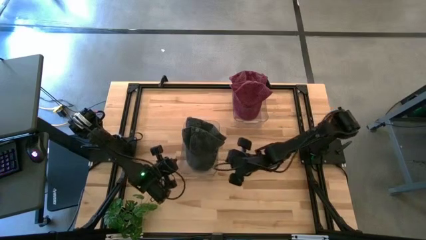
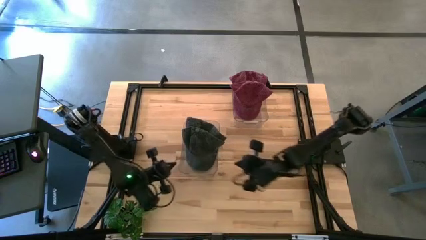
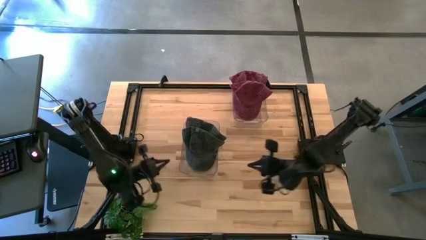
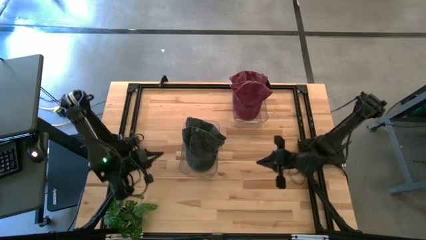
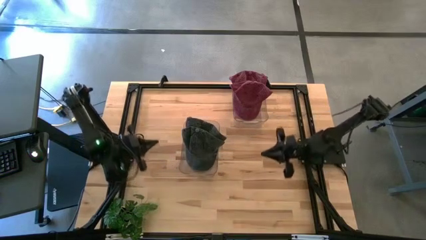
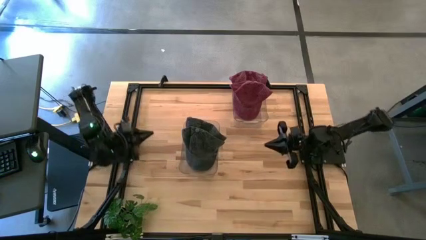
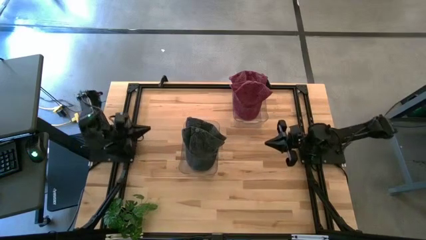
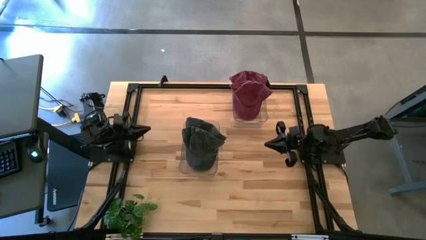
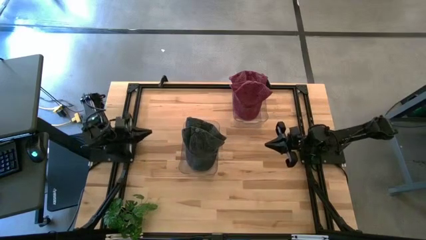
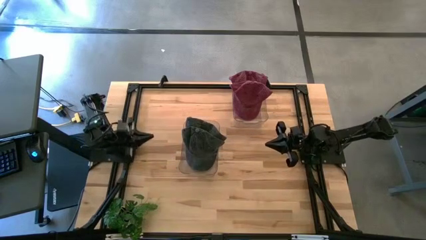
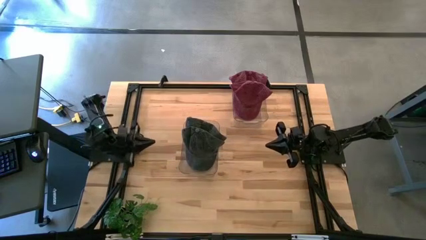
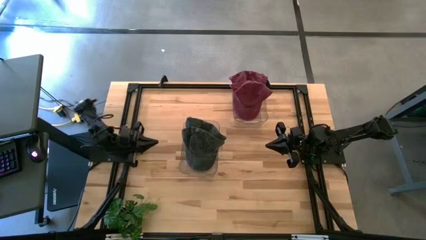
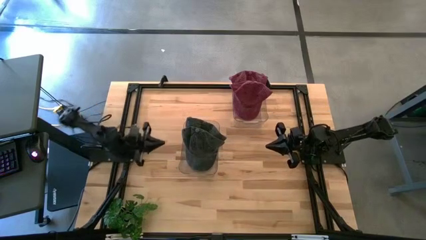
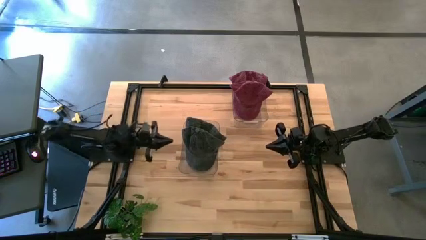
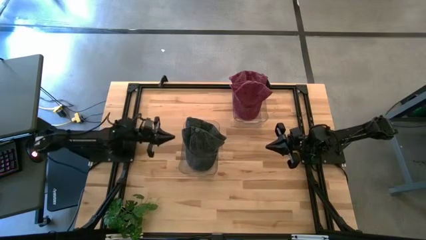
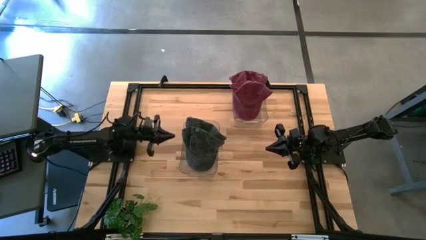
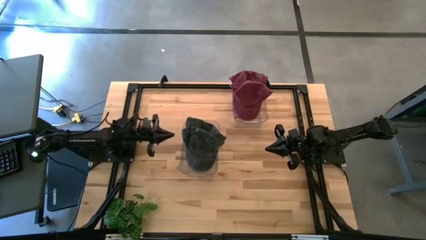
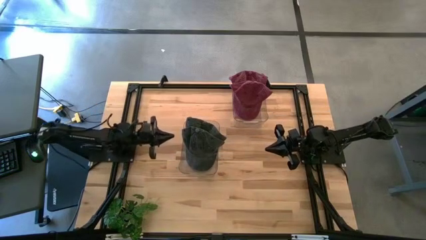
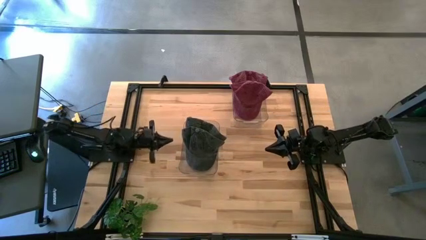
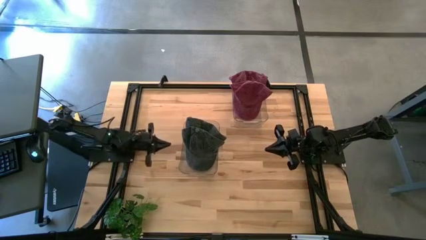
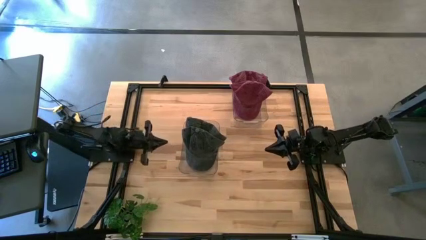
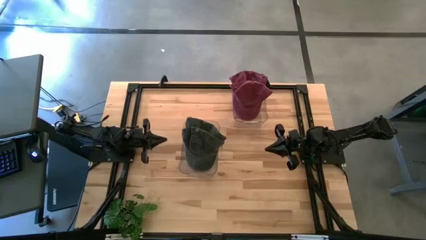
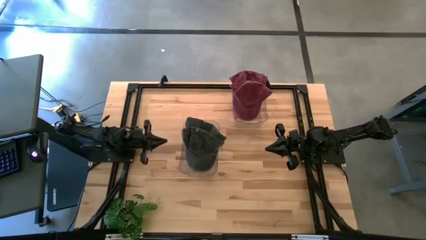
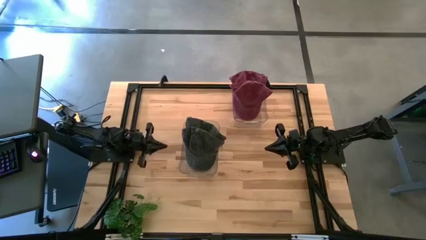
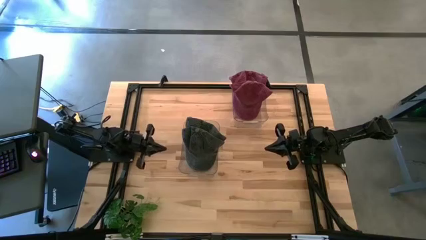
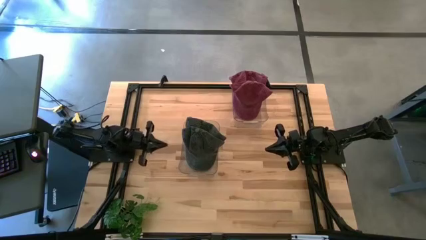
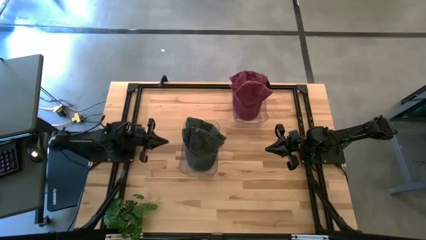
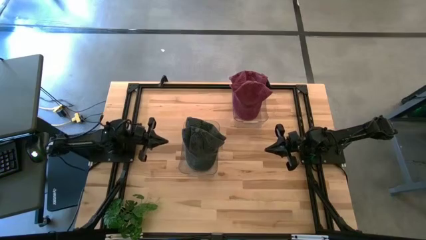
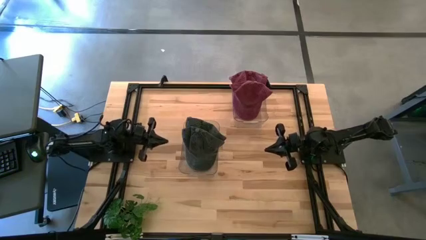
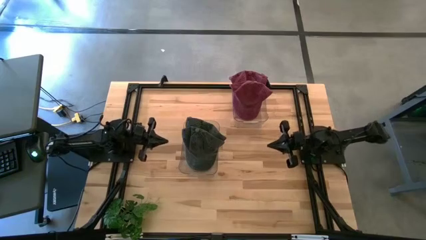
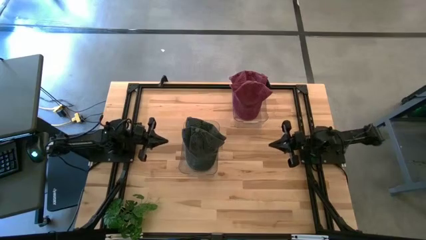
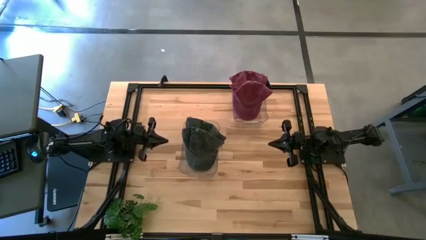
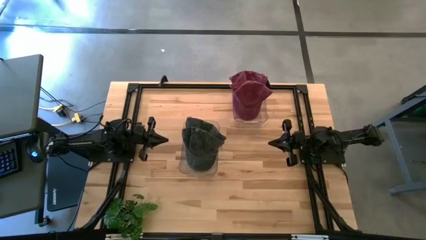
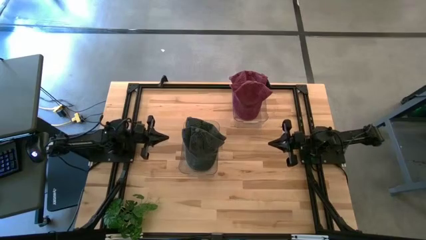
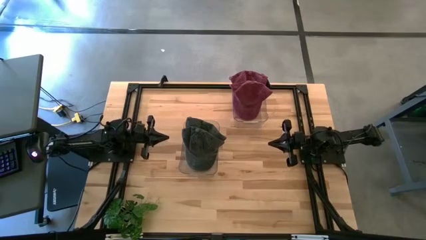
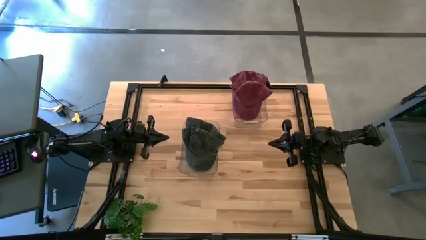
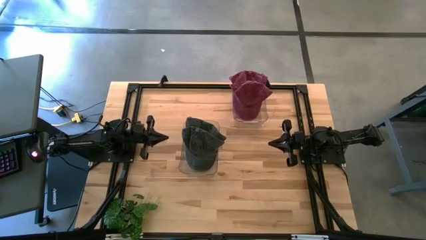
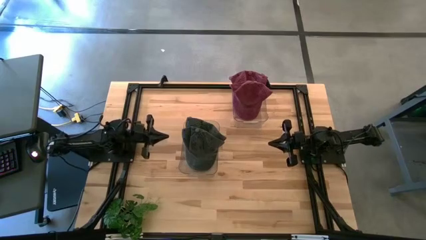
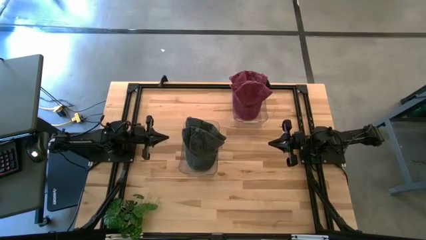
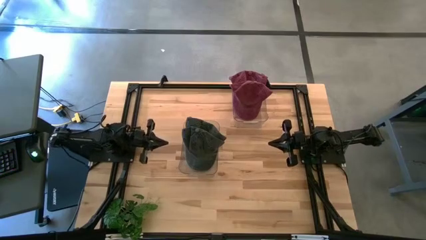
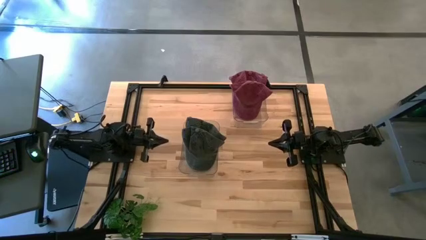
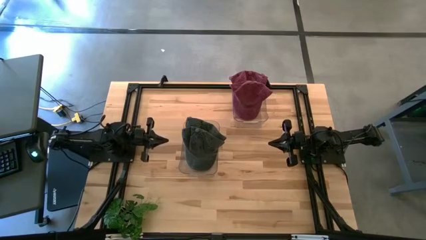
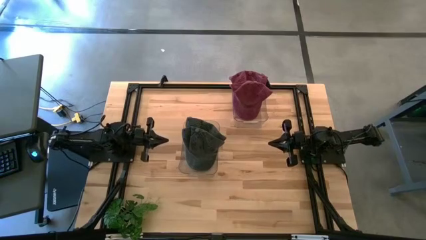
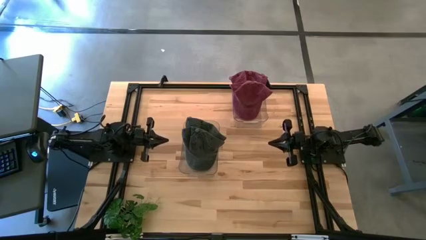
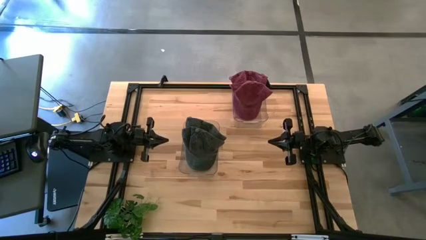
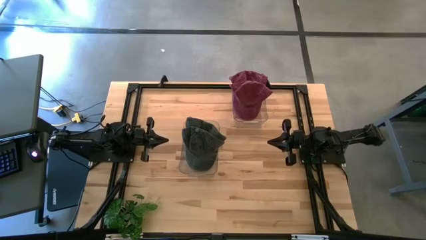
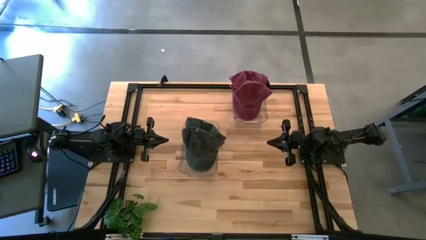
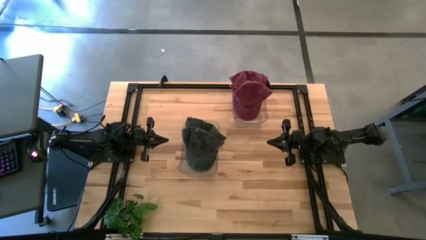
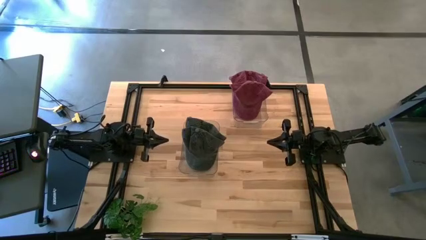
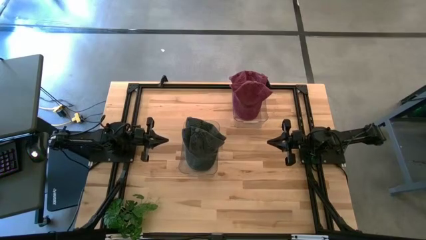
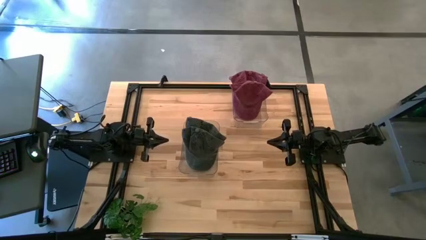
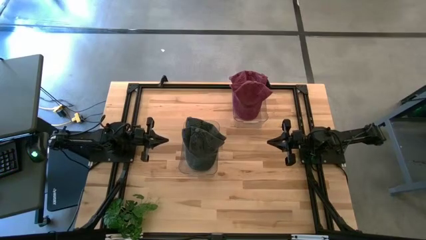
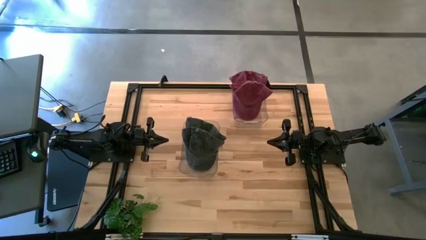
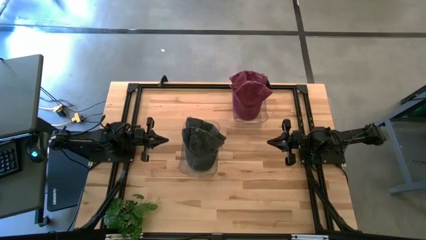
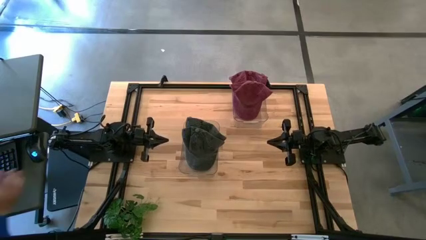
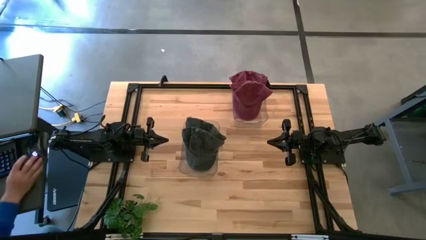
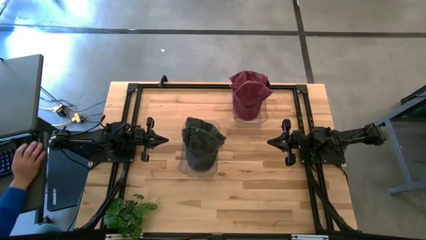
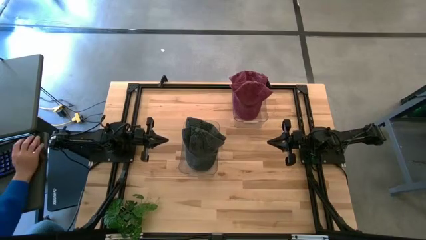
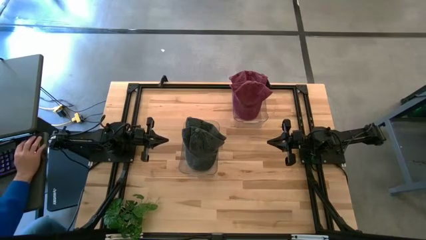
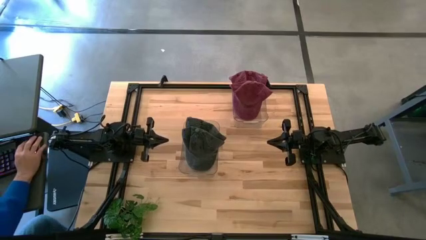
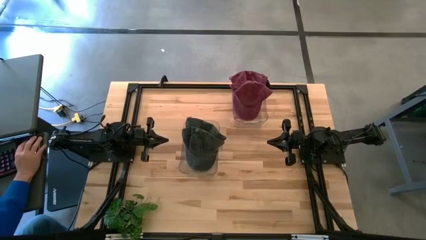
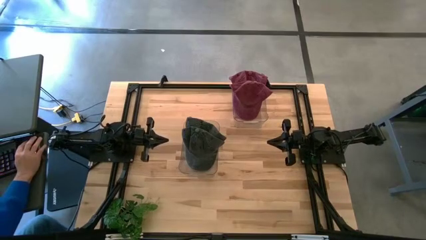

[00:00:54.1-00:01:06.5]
Task: Pick & Place hat
Return to Home Position

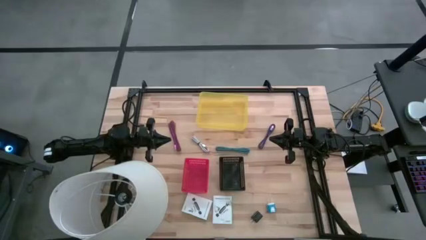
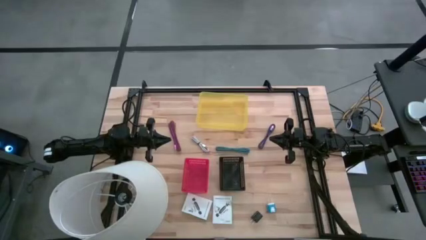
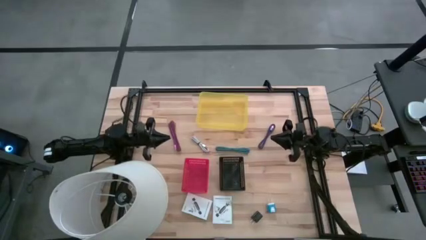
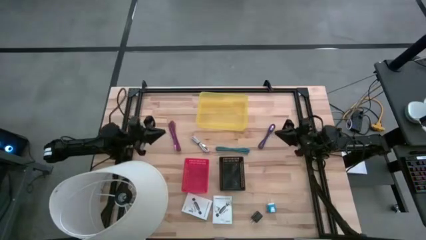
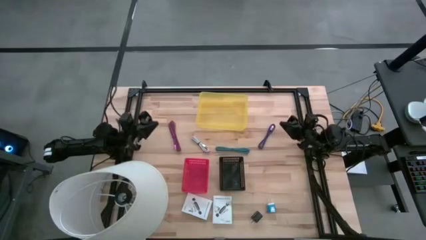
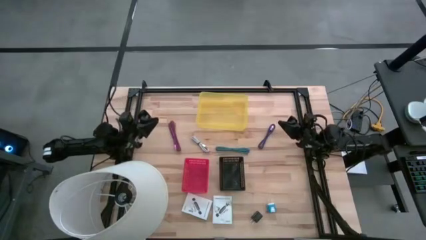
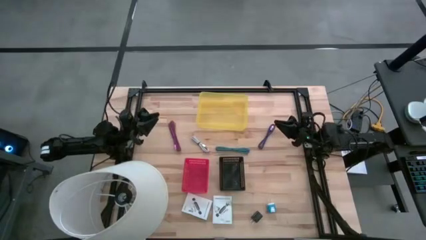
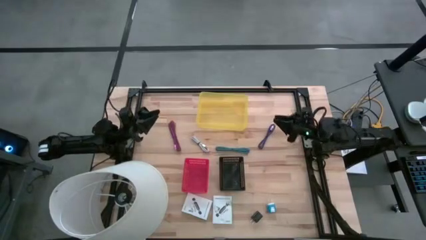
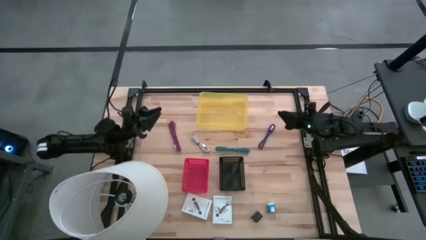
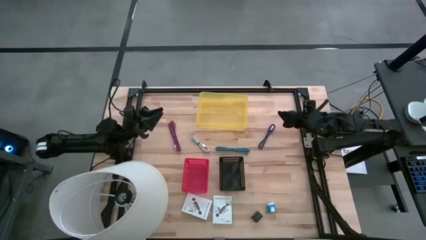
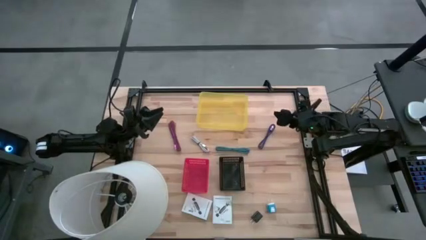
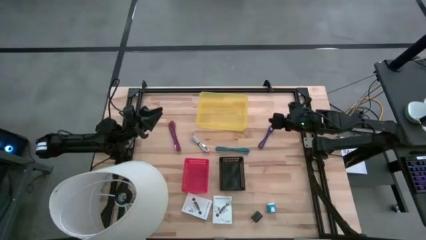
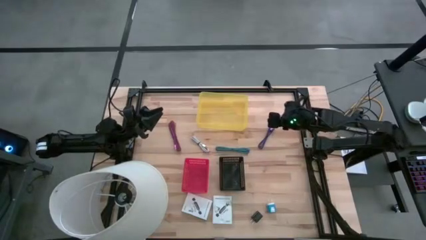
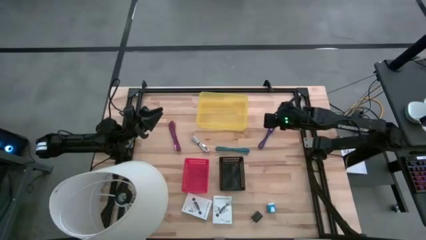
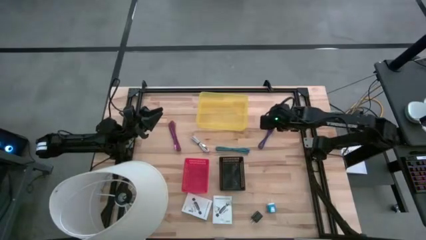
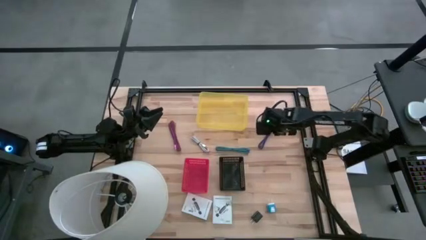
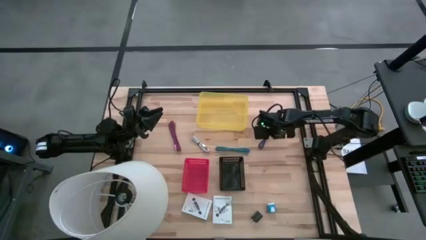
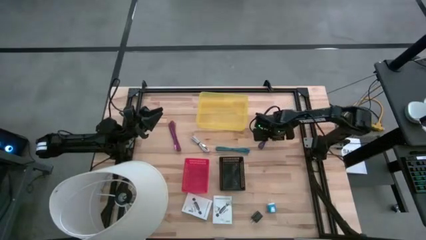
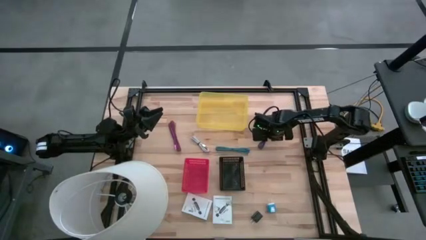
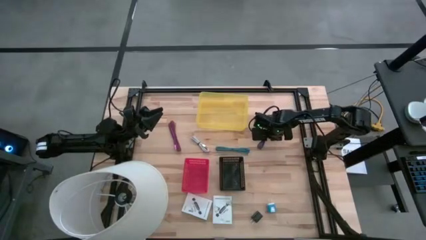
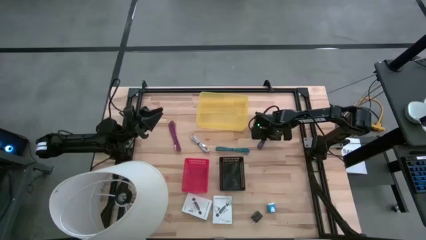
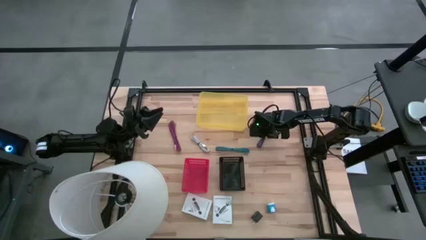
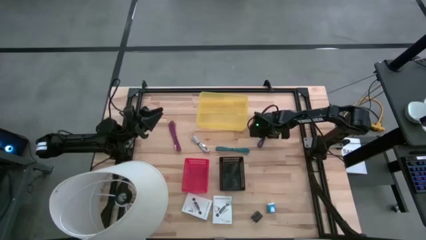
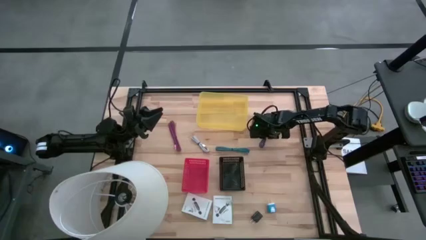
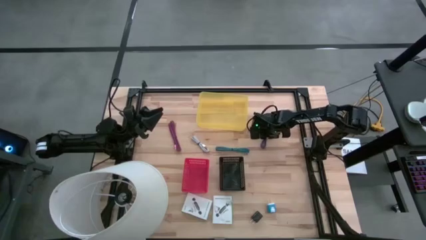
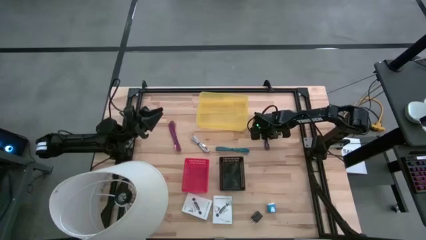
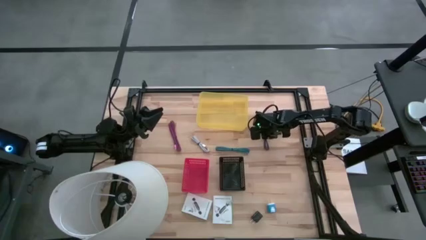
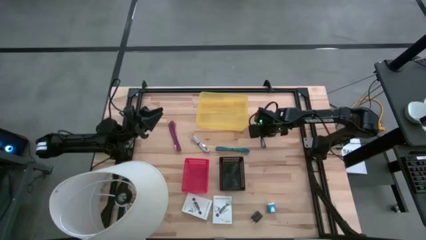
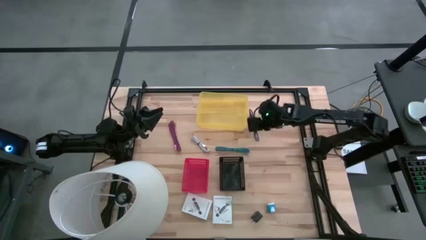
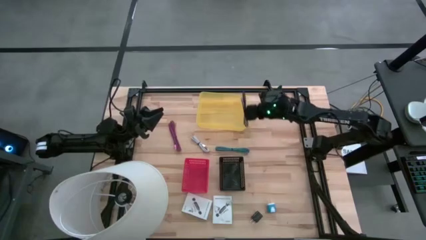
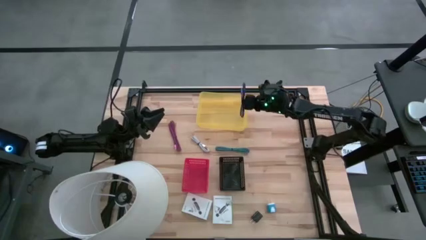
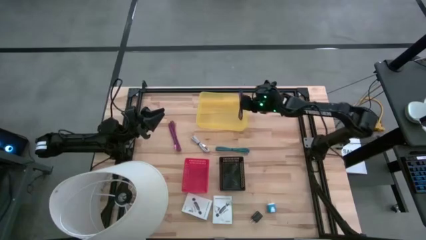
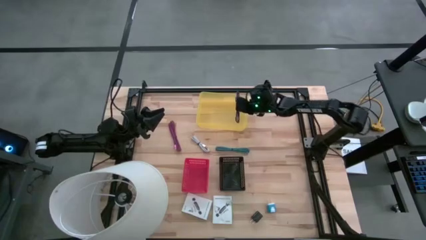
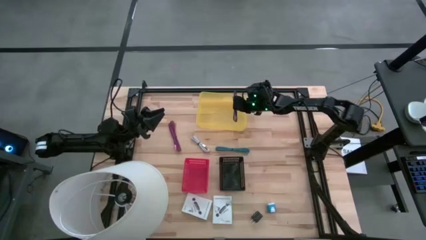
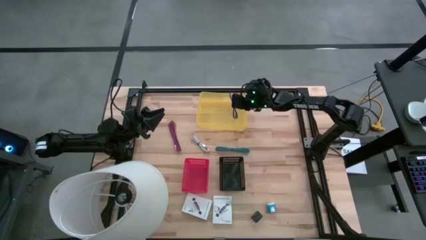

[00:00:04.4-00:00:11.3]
Task: Pick and place items into bin
Put the violet usb cable into the yellow bin
